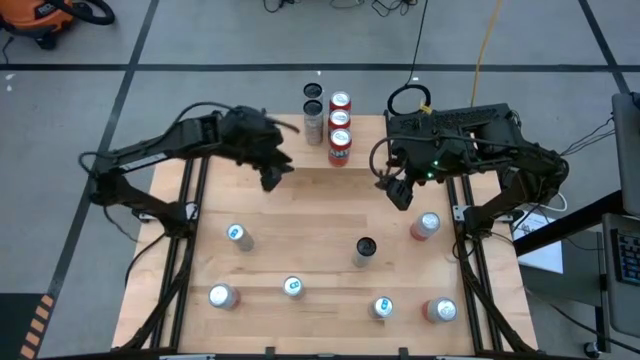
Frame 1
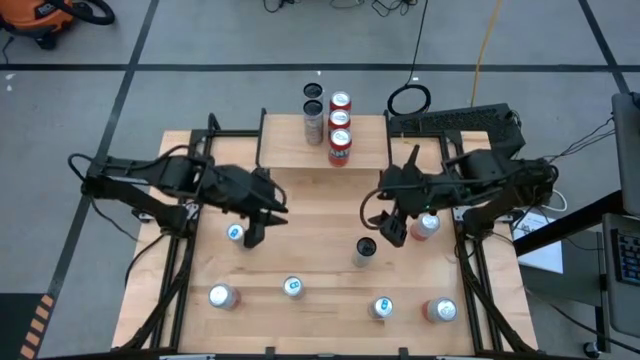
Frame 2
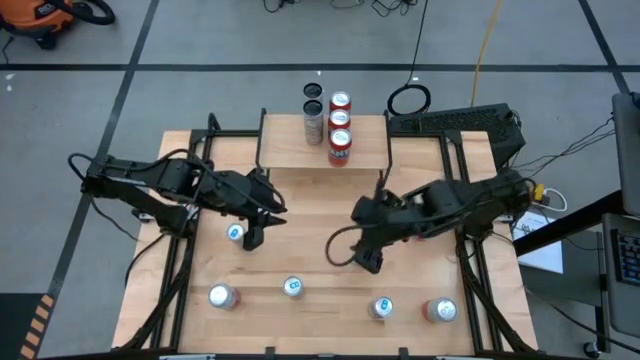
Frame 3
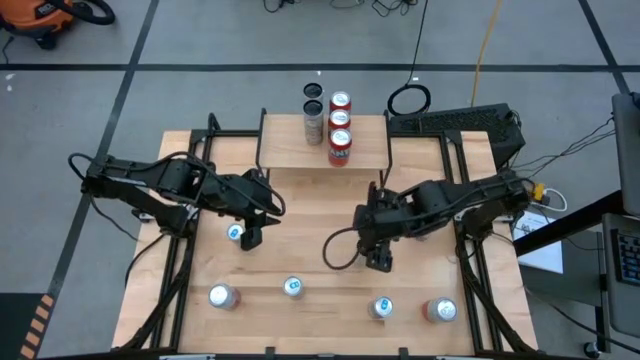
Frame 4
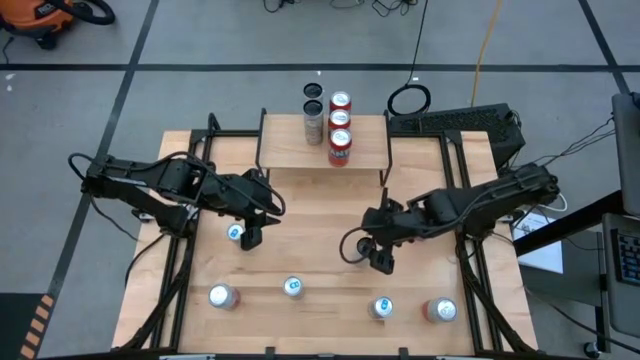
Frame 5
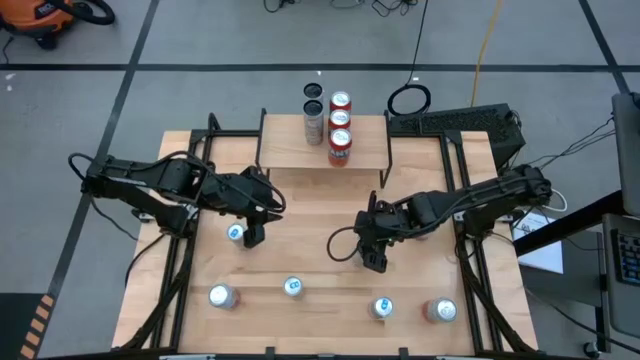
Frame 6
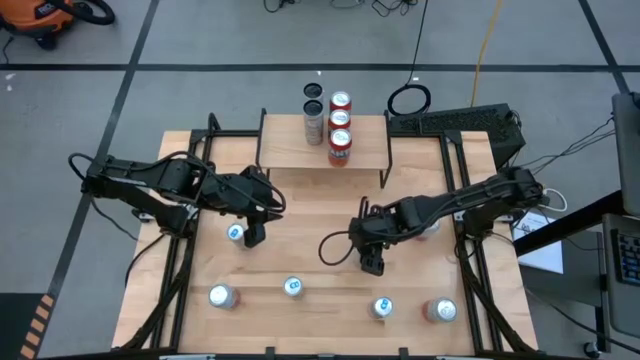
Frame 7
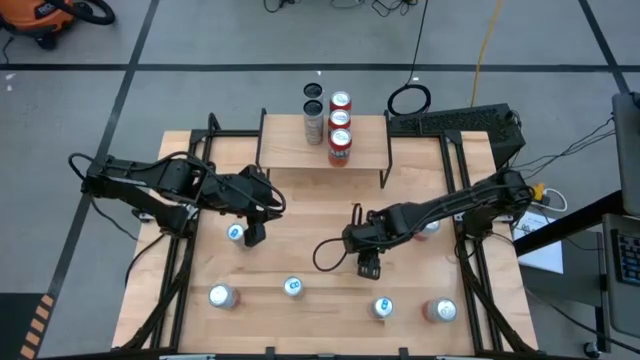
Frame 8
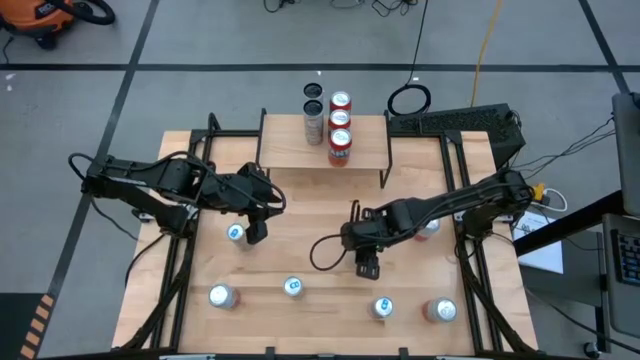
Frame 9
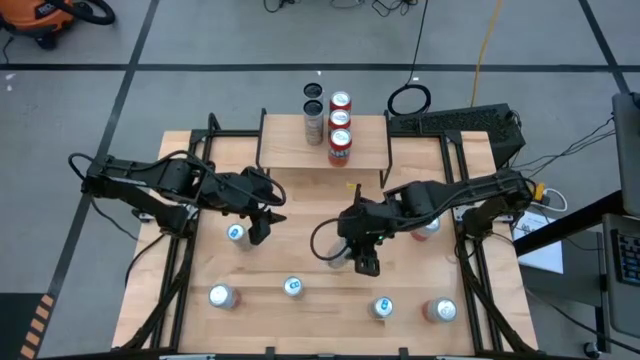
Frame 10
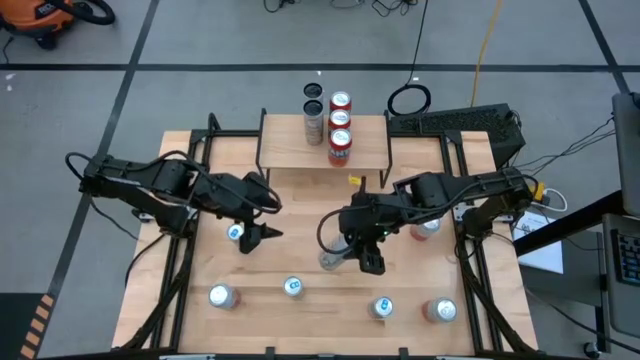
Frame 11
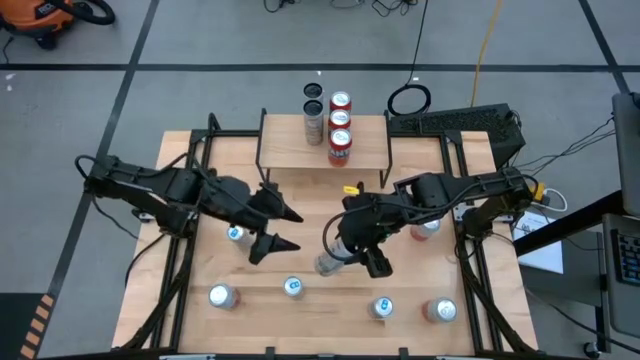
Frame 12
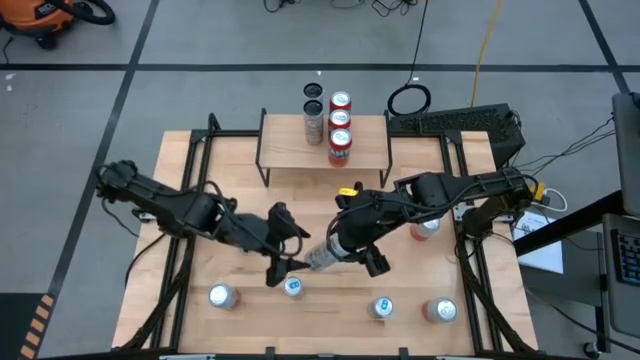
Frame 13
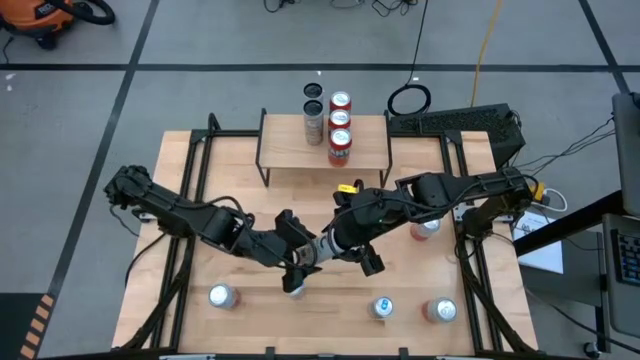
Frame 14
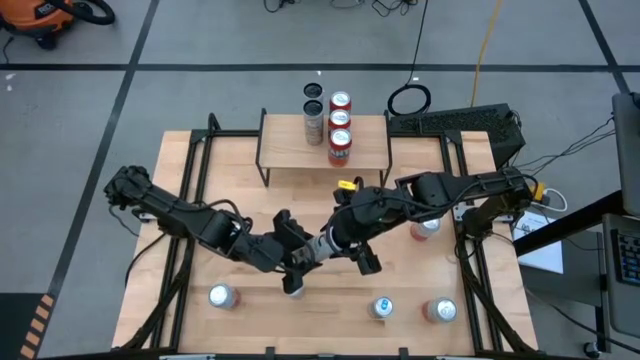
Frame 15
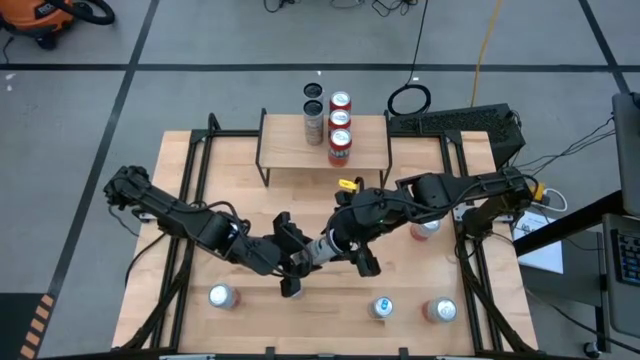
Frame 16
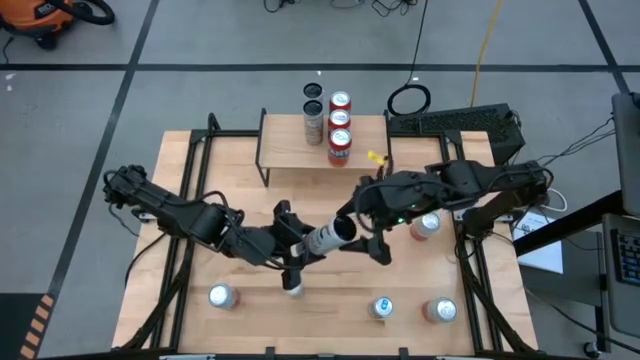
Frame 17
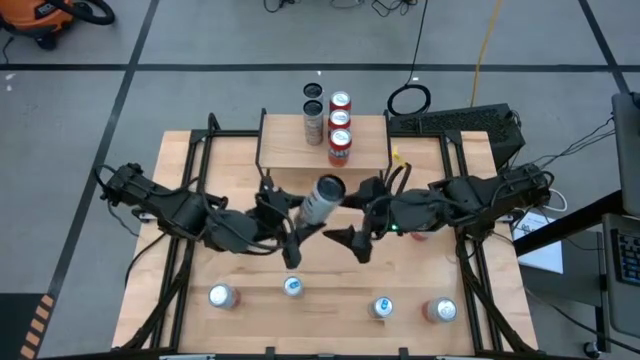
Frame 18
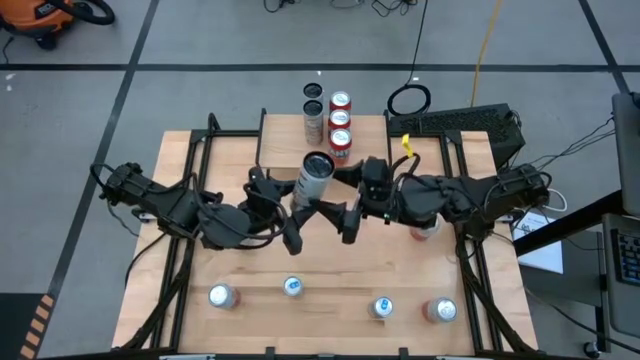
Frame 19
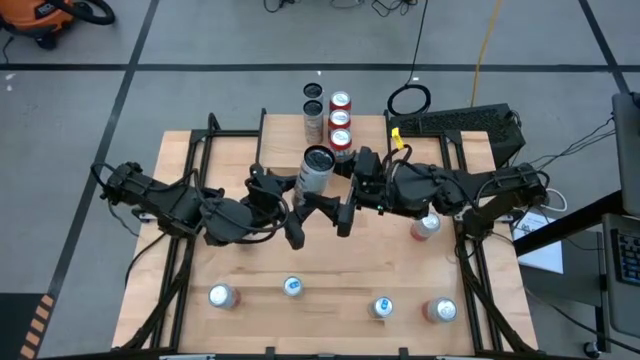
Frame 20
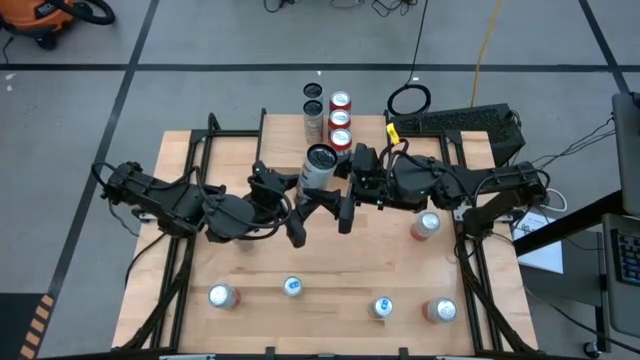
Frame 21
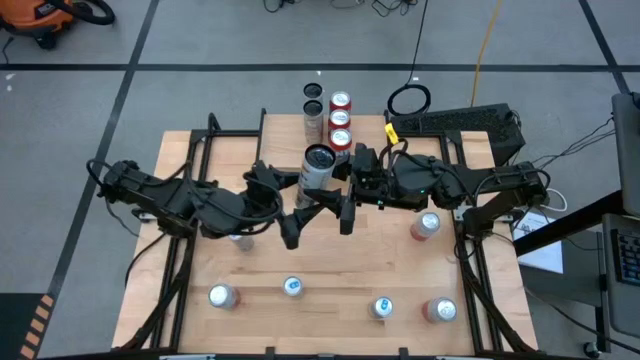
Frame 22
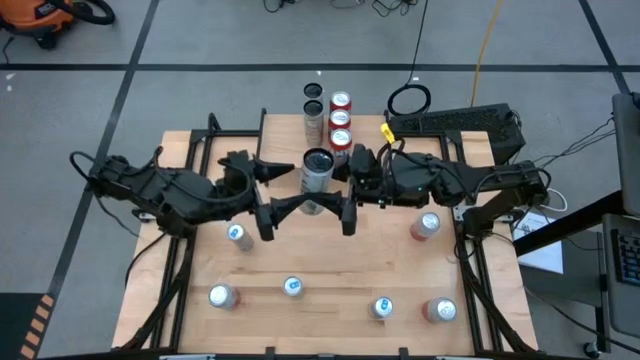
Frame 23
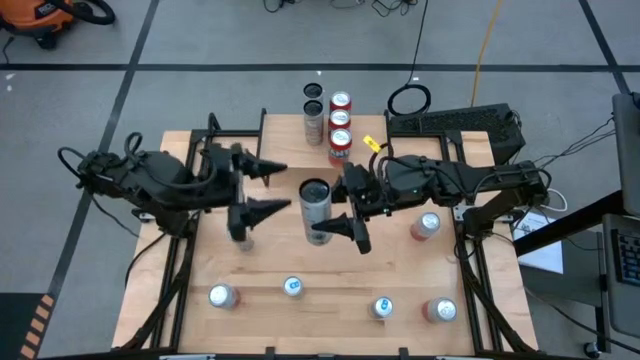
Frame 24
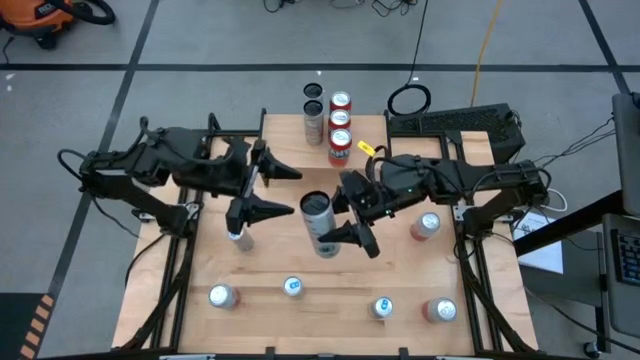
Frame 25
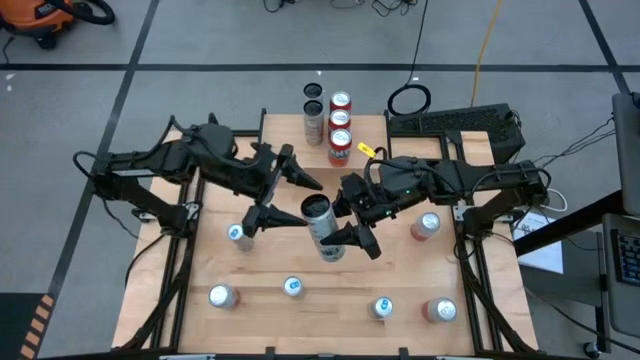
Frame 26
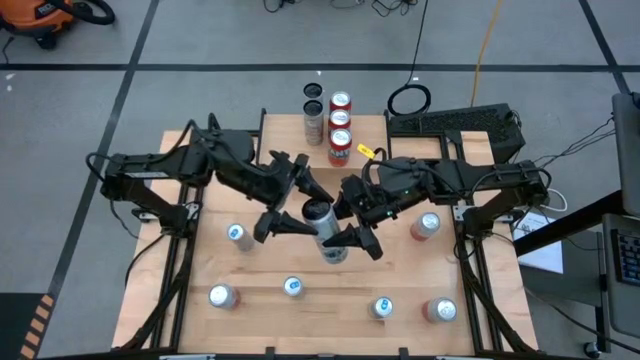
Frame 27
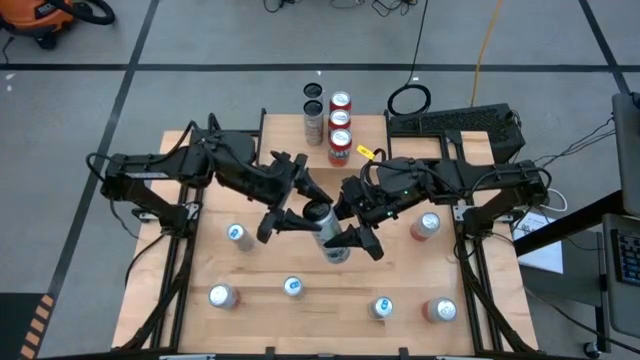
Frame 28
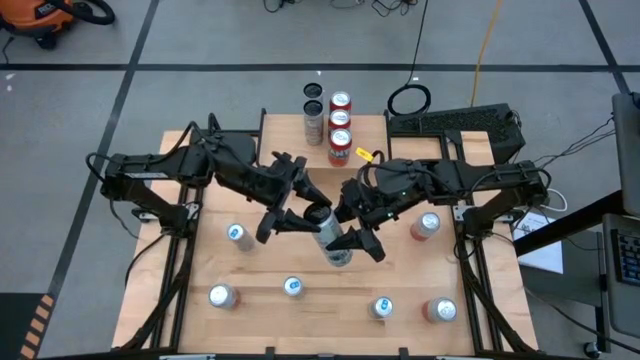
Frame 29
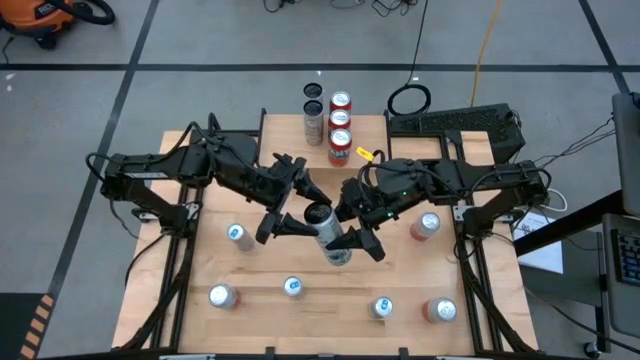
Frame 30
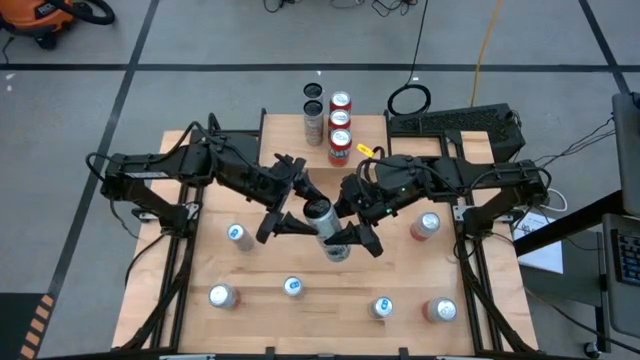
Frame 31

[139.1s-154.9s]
Task: Place canned beverage on shelf
Put the white and yellow soda can aligned with the other white and yellow soda cans on the shelf
